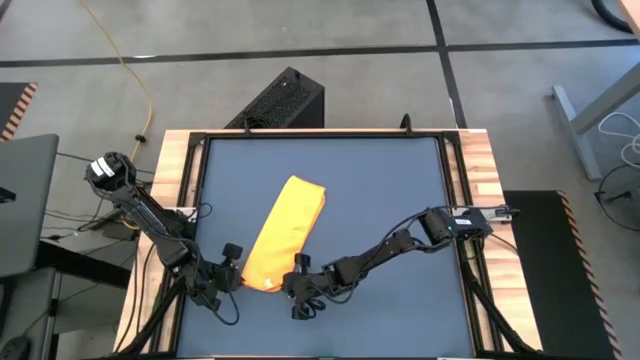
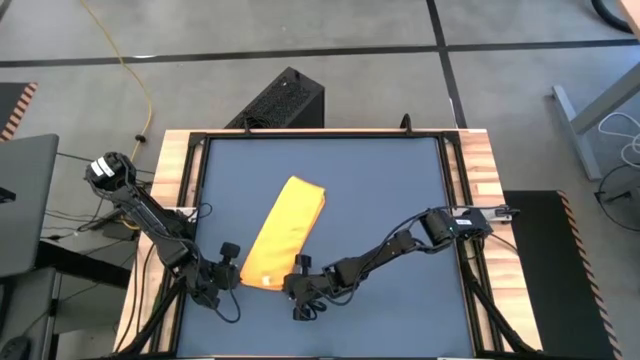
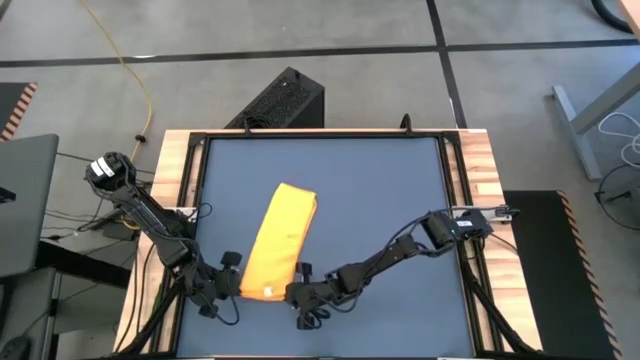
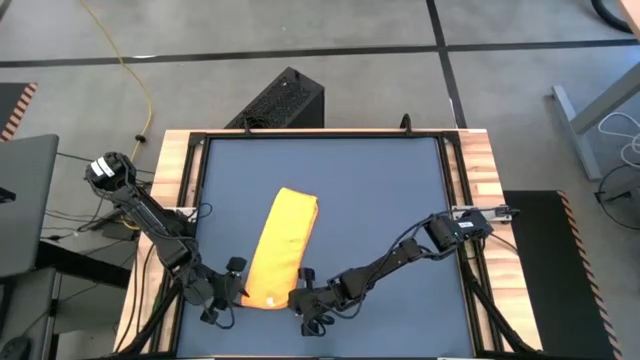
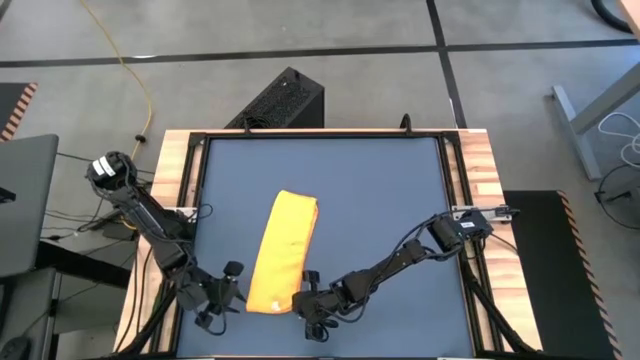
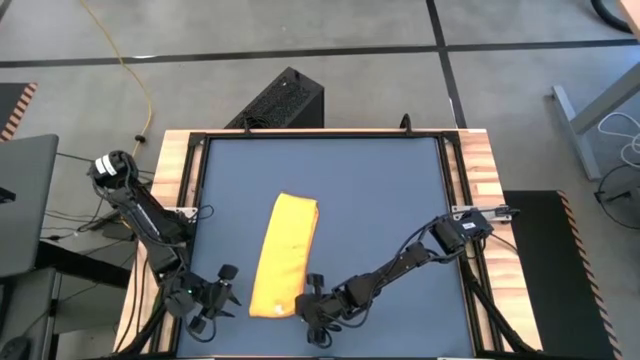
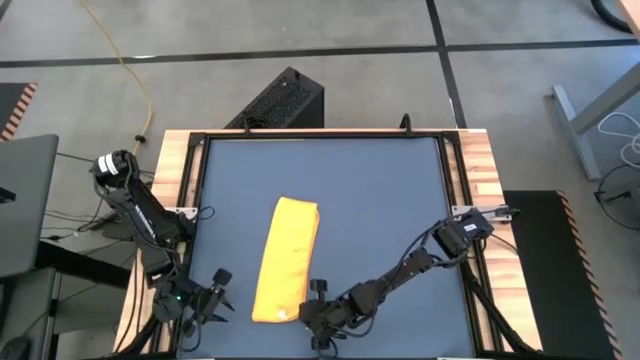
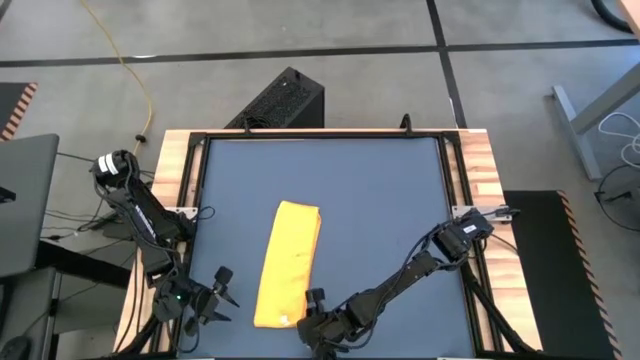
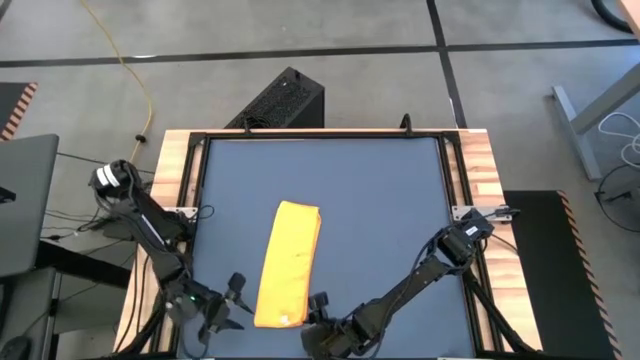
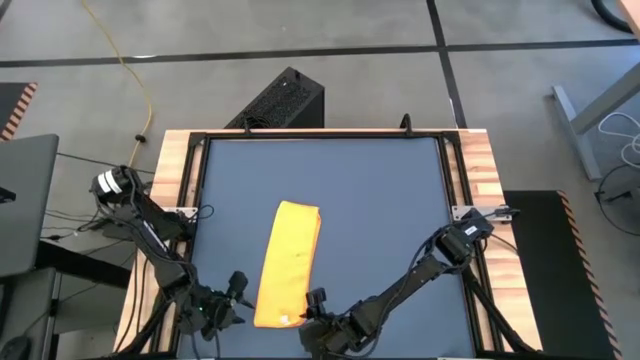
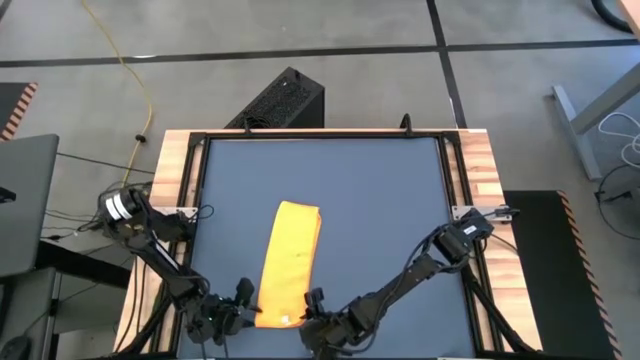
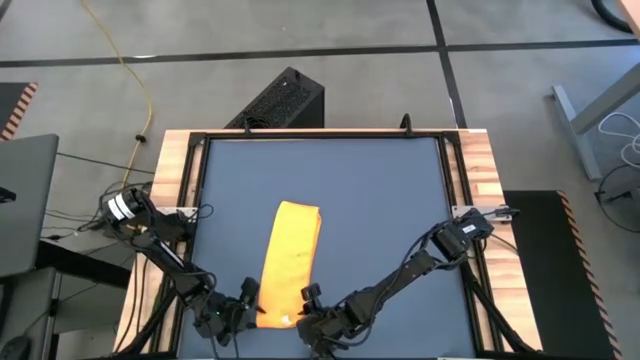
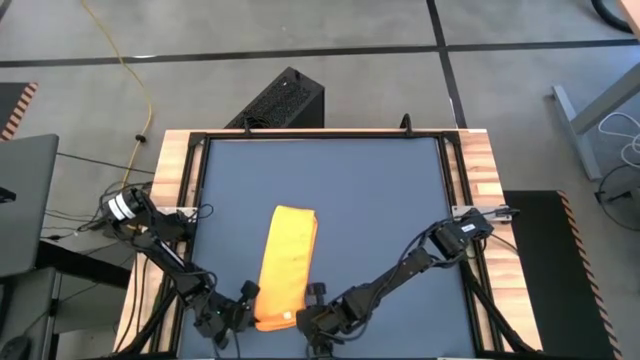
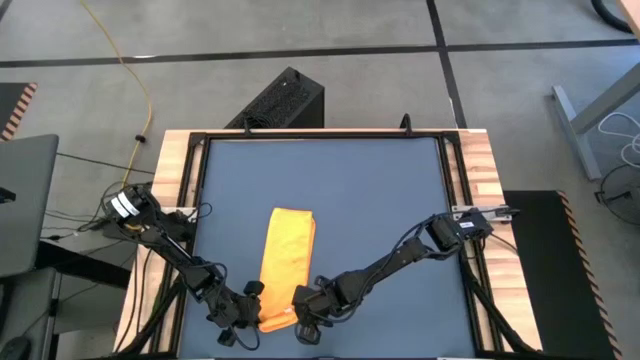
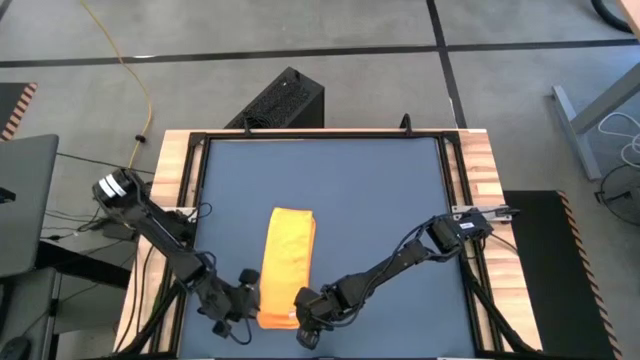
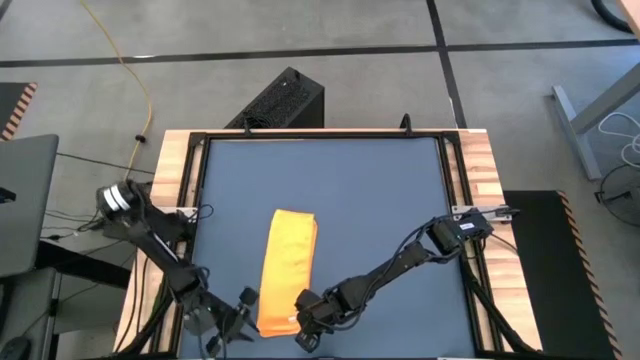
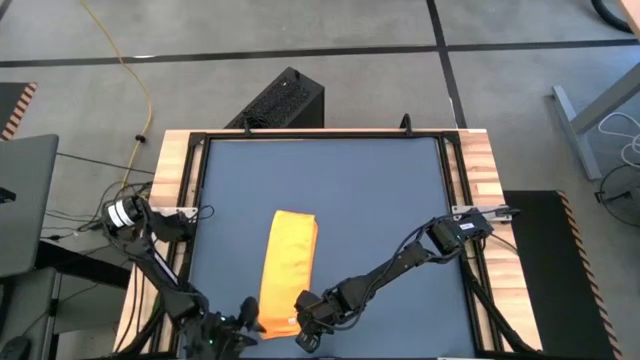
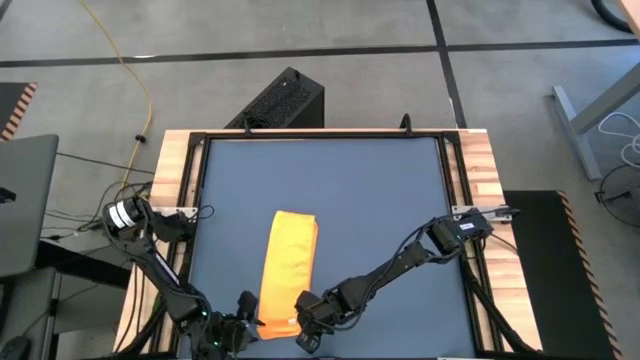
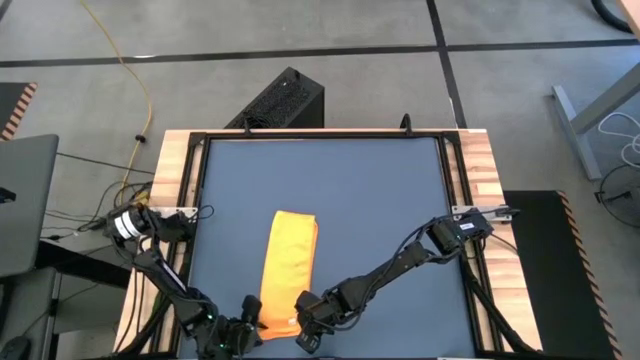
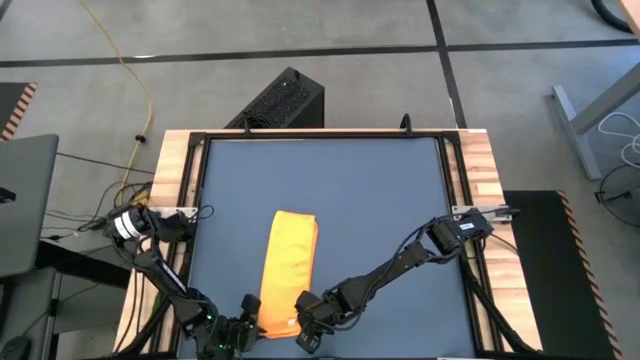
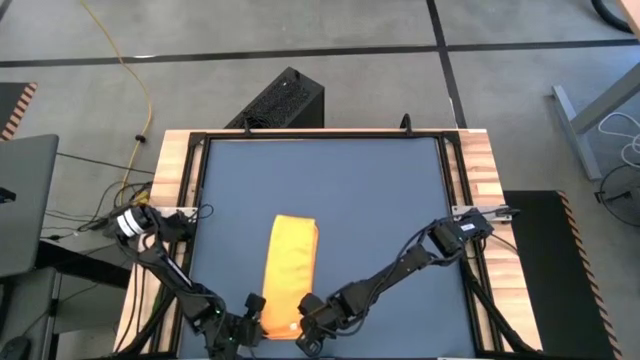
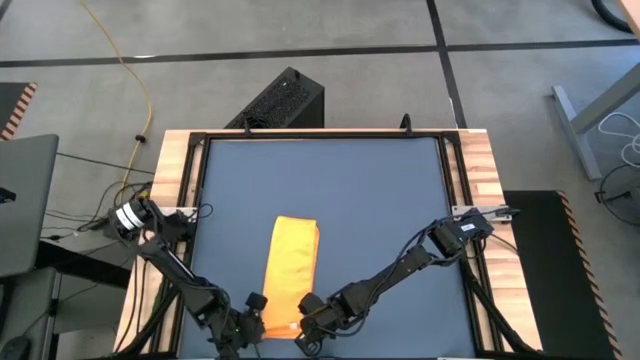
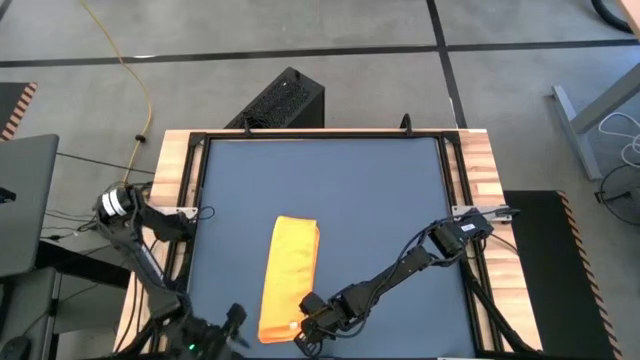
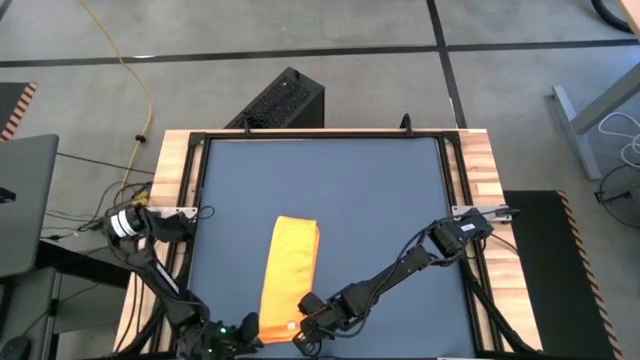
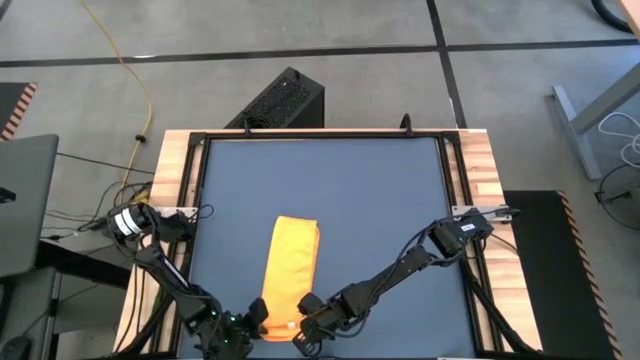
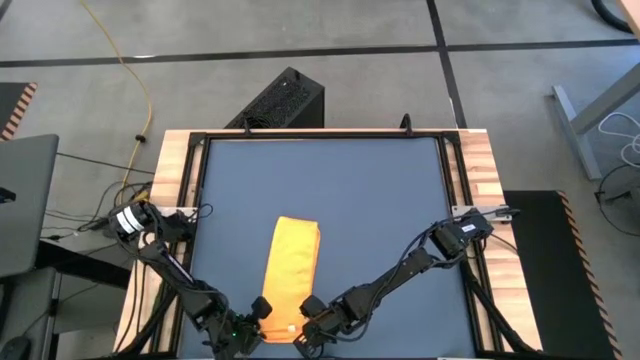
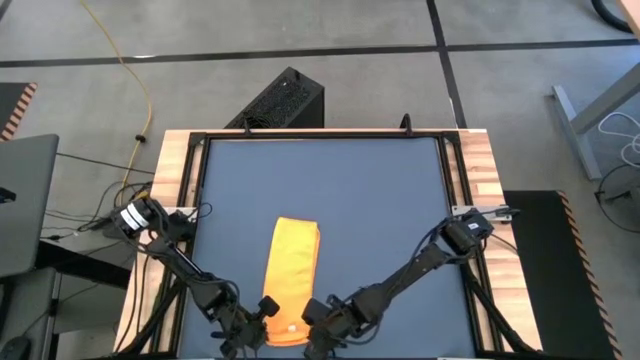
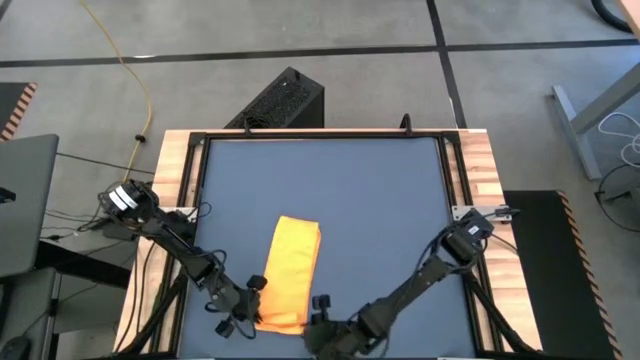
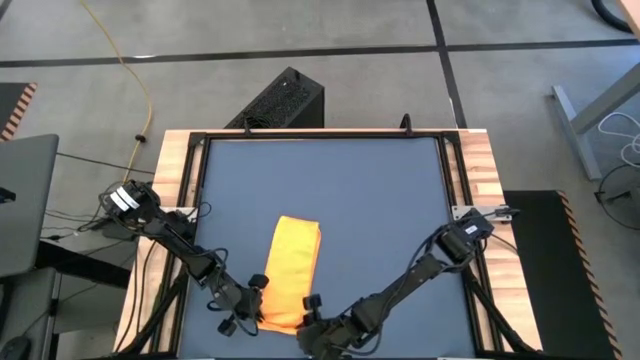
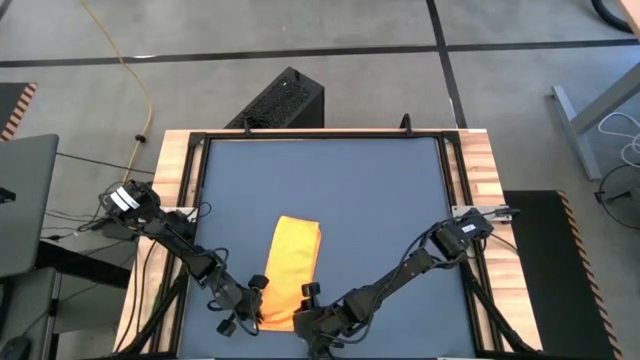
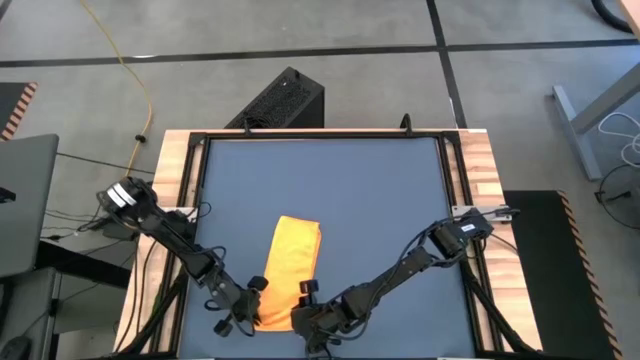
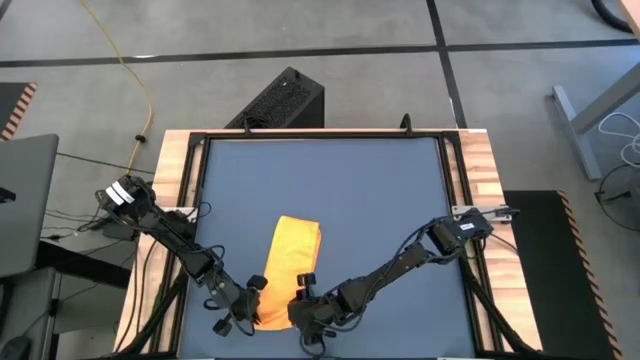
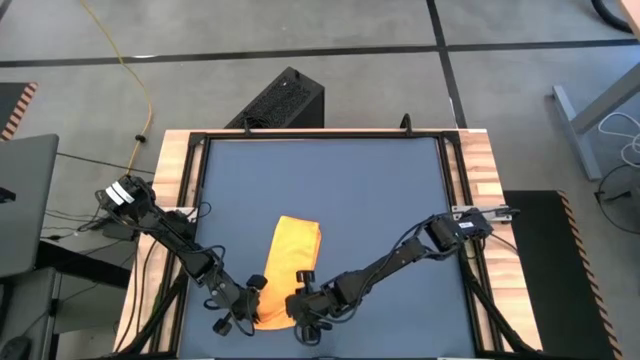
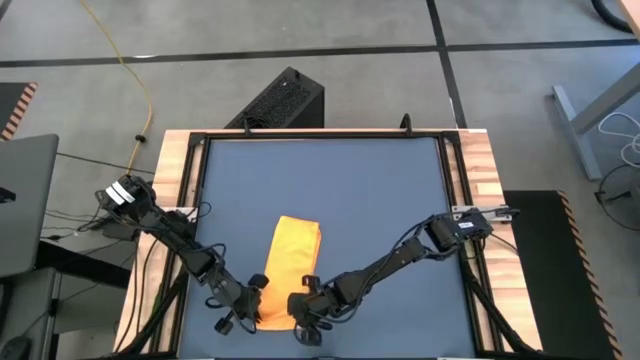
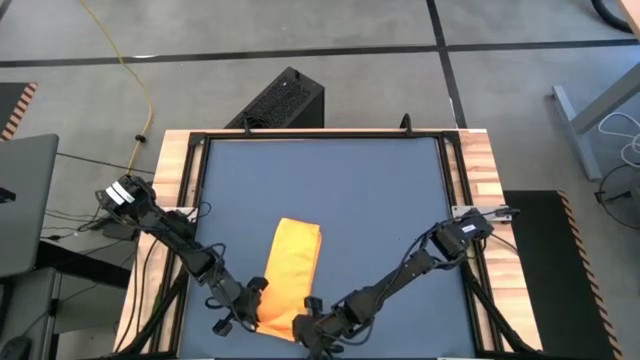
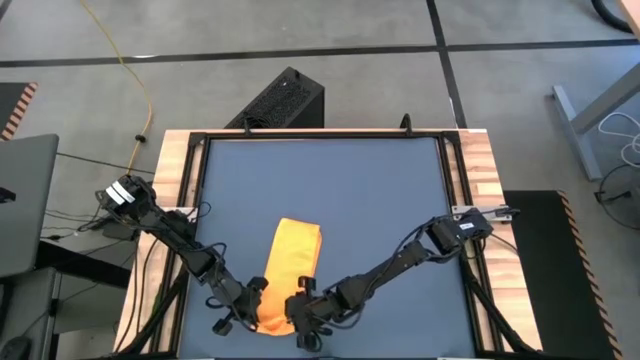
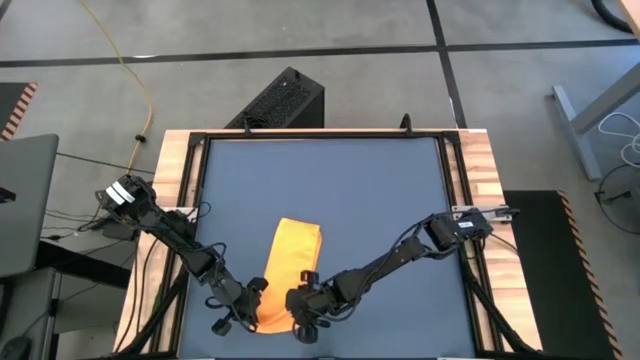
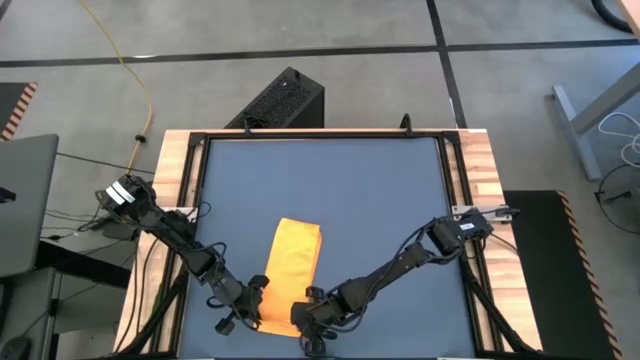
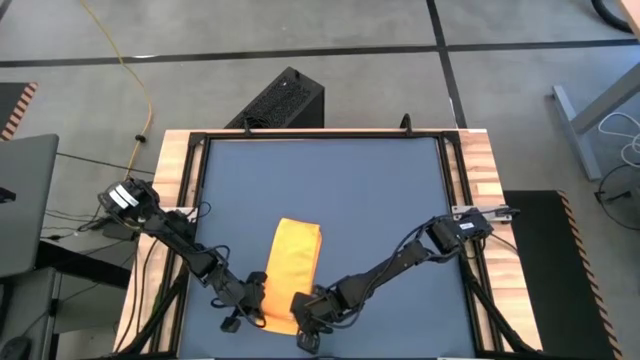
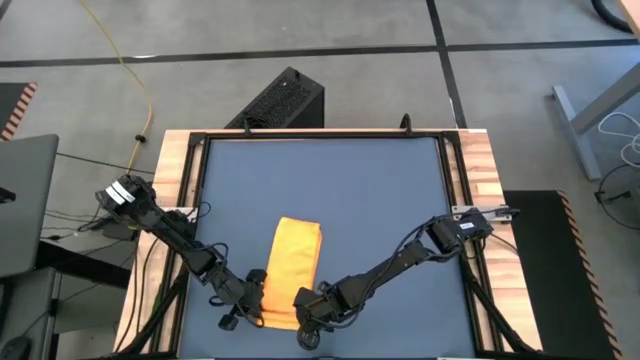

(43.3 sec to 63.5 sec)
Task: Roll towel
Roll the yellow microfiber cloth on the table

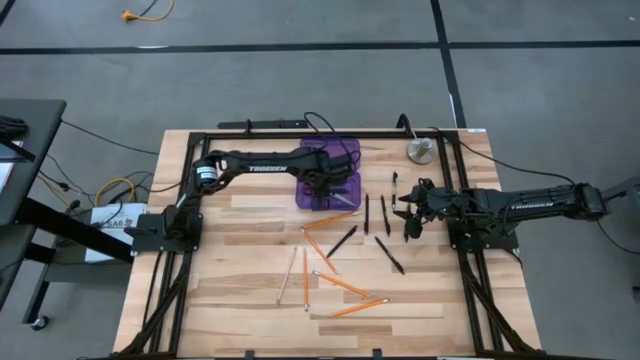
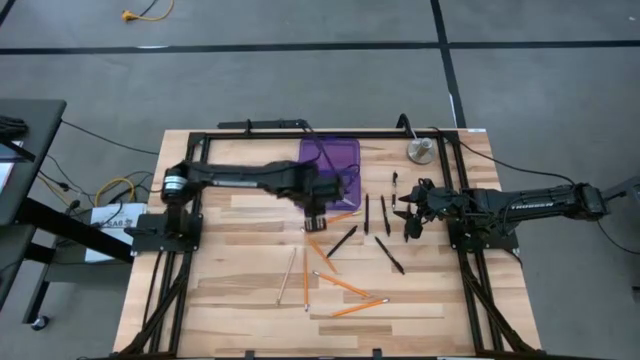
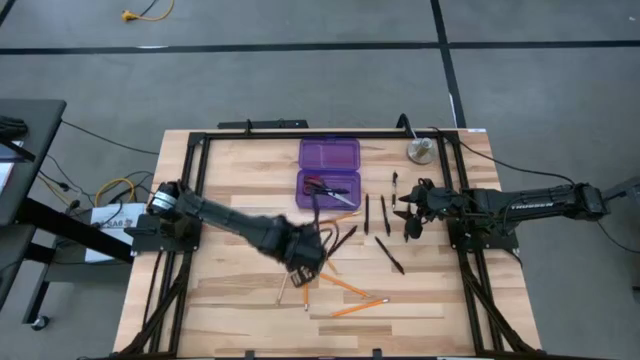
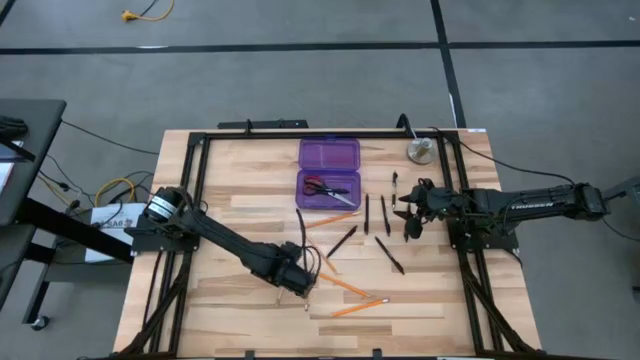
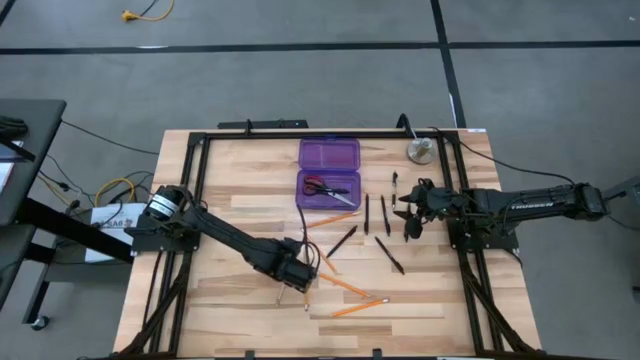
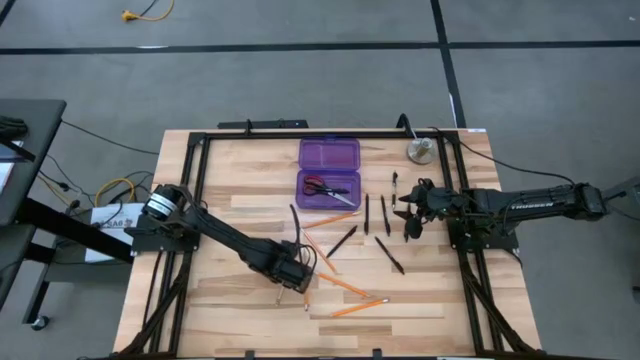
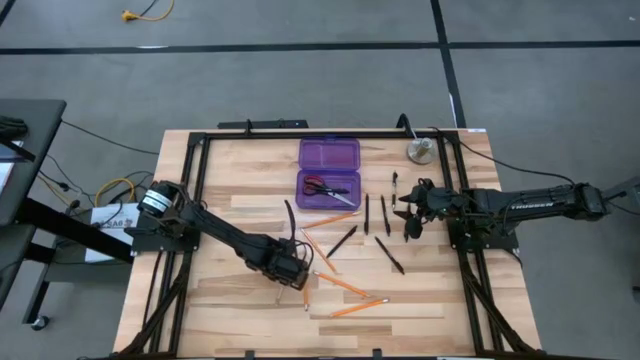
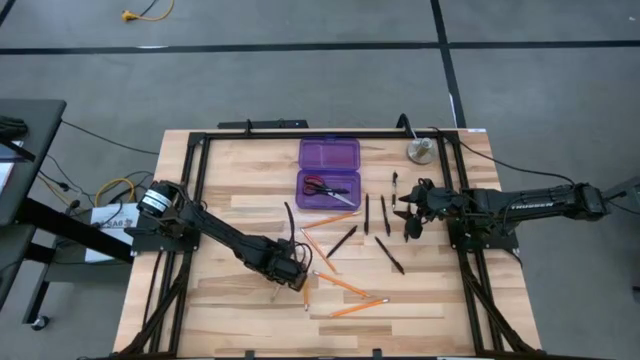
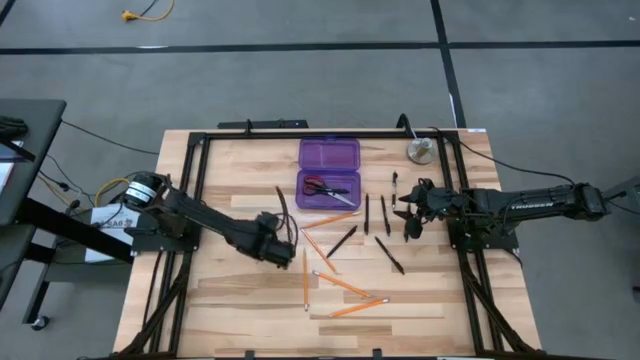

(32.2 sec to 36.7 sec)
Task: Pick & place school supplies into a supply box
Put the pink pencil into the violet supply box
